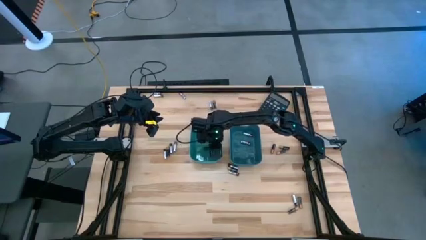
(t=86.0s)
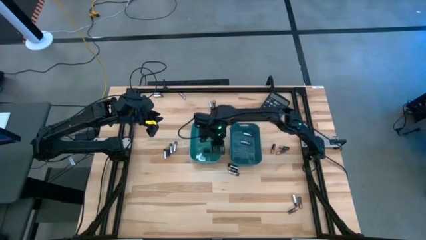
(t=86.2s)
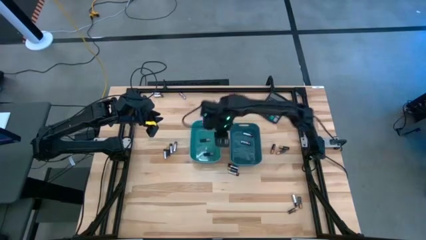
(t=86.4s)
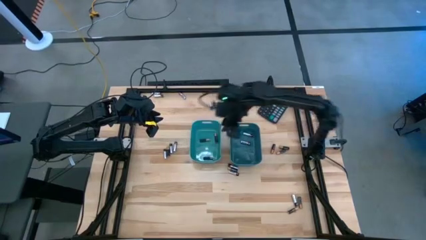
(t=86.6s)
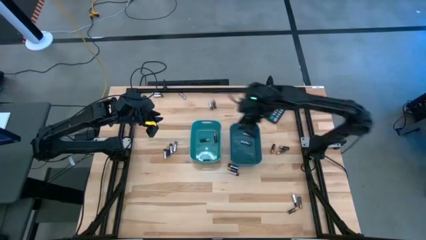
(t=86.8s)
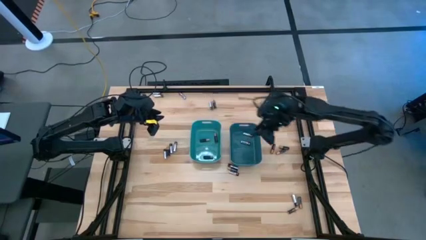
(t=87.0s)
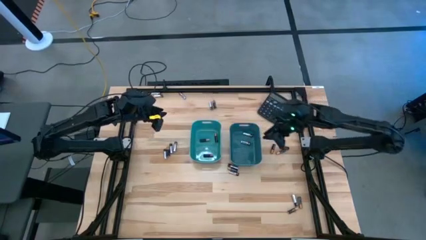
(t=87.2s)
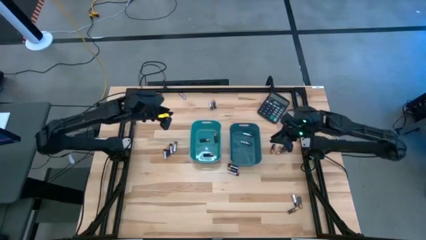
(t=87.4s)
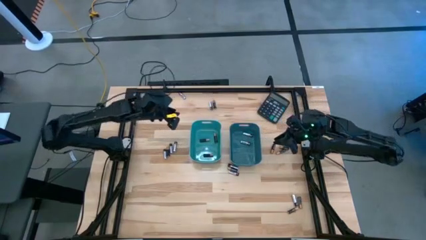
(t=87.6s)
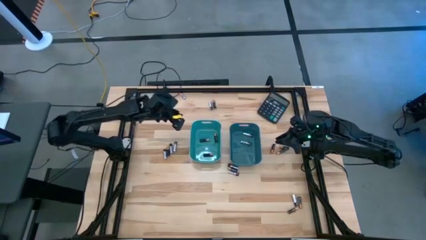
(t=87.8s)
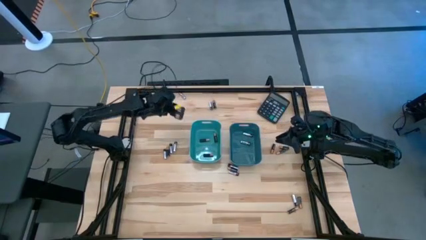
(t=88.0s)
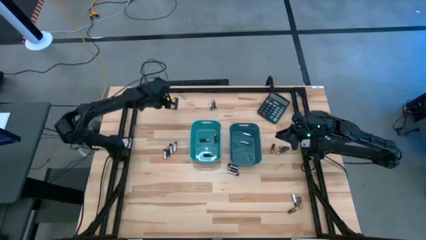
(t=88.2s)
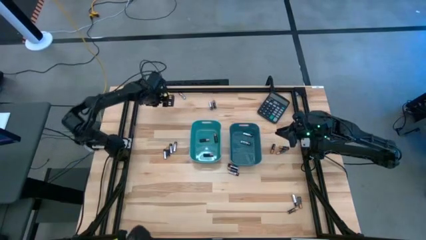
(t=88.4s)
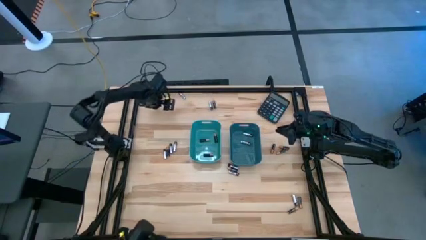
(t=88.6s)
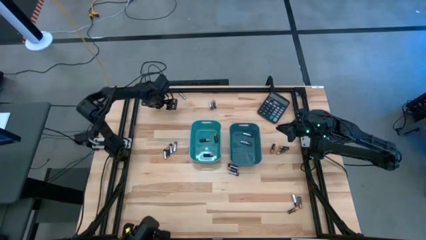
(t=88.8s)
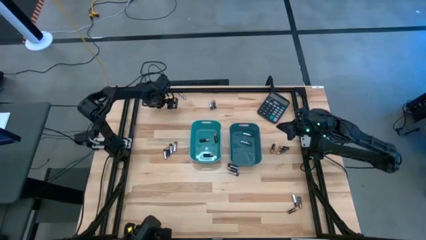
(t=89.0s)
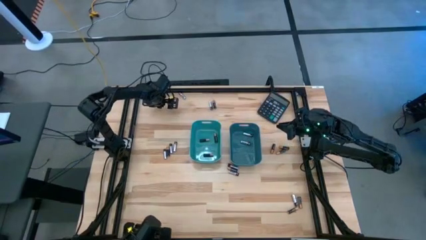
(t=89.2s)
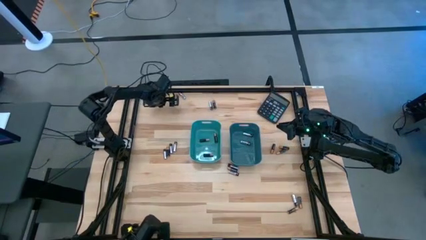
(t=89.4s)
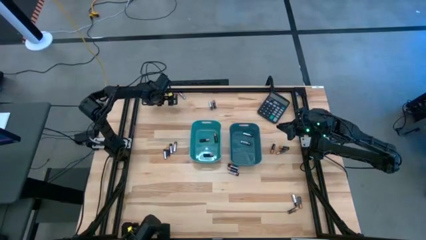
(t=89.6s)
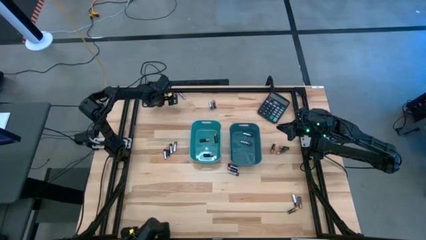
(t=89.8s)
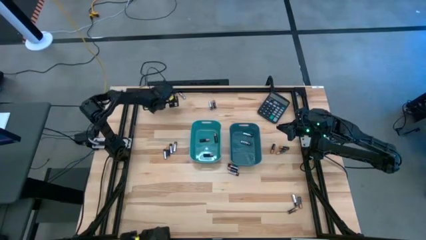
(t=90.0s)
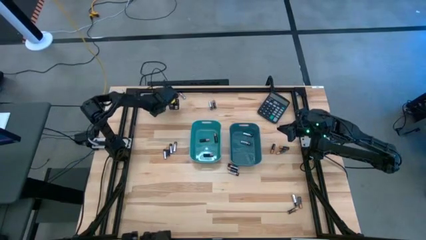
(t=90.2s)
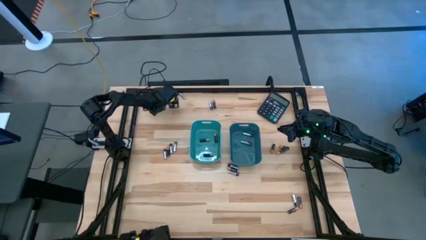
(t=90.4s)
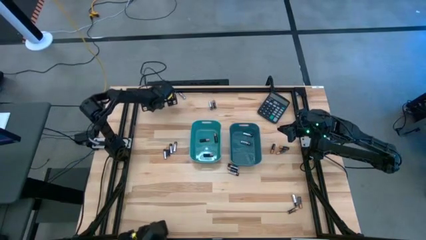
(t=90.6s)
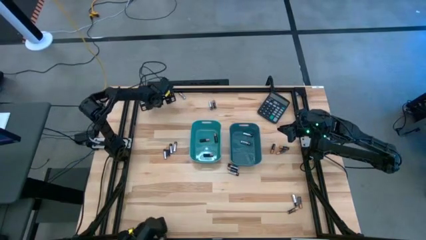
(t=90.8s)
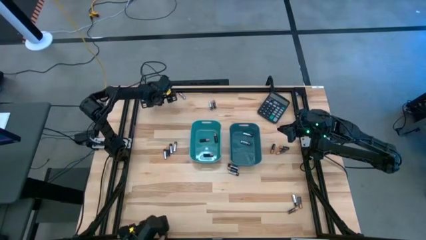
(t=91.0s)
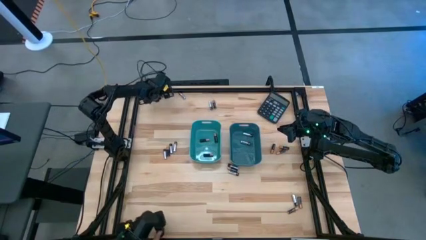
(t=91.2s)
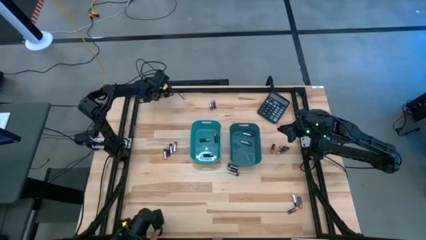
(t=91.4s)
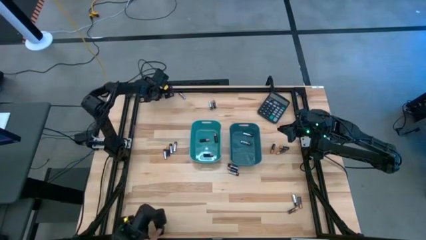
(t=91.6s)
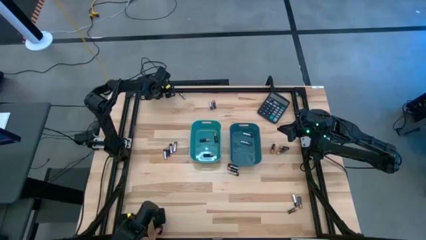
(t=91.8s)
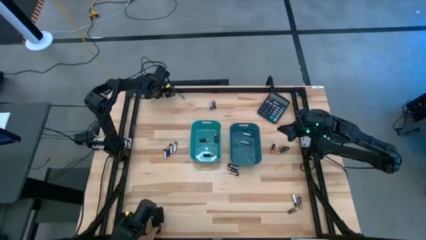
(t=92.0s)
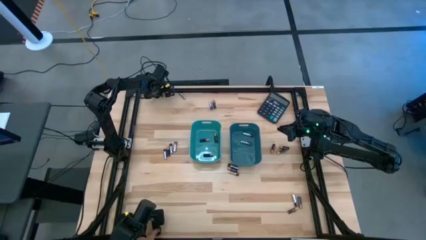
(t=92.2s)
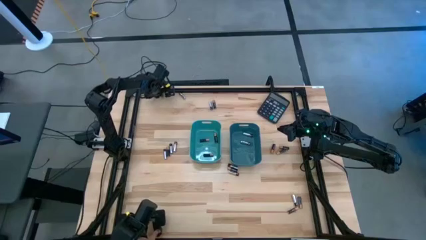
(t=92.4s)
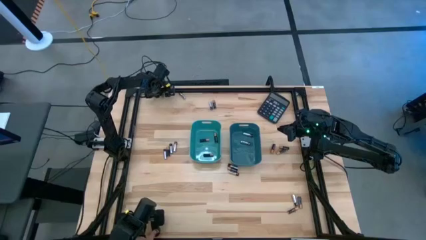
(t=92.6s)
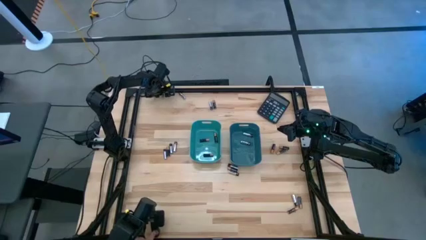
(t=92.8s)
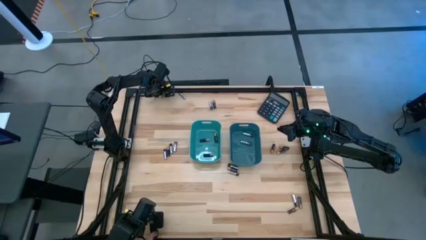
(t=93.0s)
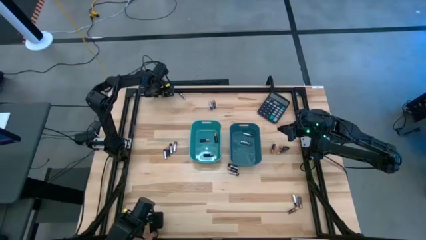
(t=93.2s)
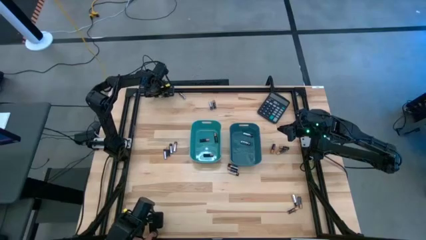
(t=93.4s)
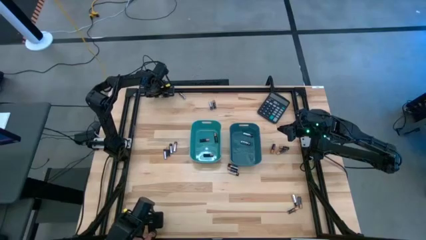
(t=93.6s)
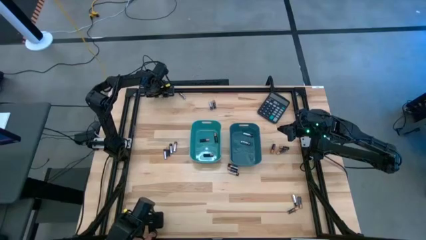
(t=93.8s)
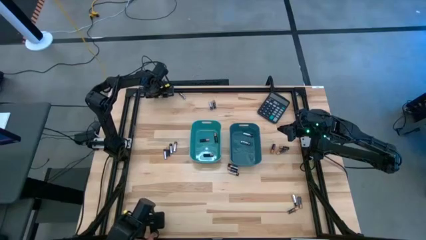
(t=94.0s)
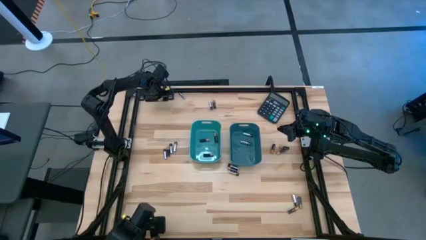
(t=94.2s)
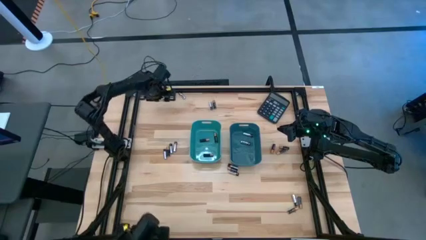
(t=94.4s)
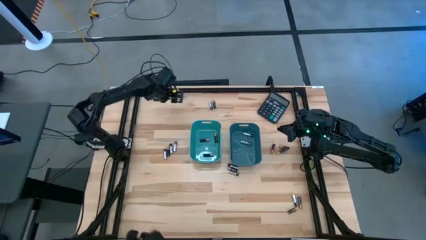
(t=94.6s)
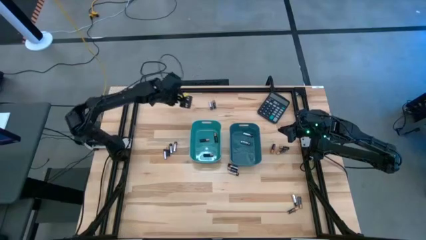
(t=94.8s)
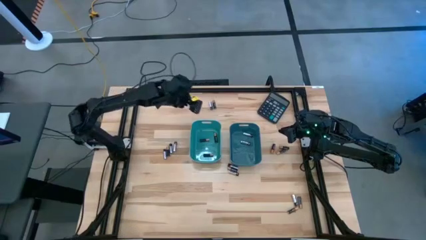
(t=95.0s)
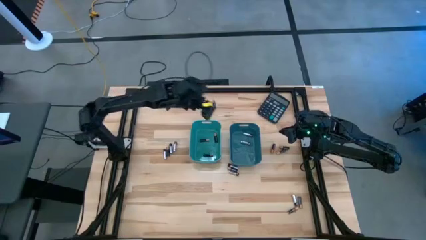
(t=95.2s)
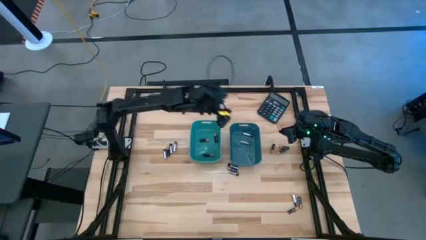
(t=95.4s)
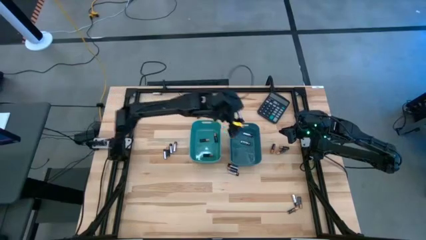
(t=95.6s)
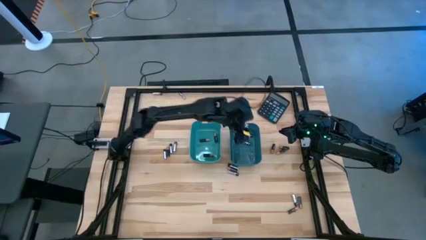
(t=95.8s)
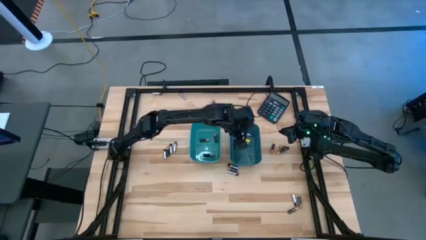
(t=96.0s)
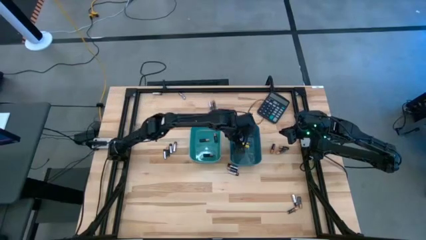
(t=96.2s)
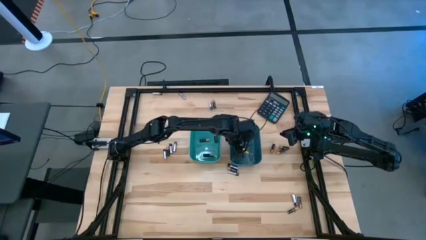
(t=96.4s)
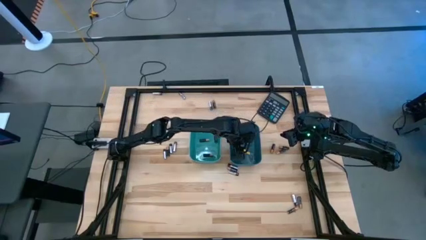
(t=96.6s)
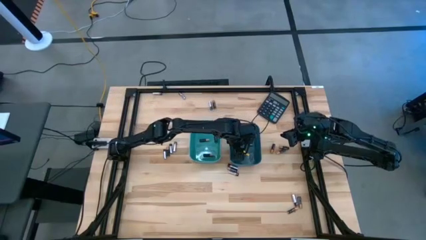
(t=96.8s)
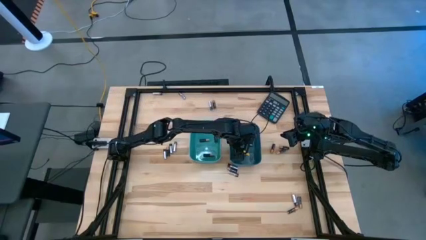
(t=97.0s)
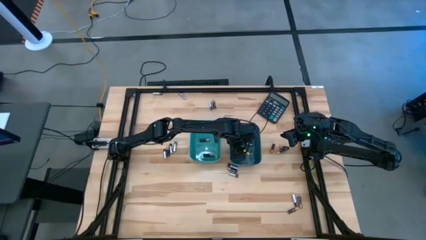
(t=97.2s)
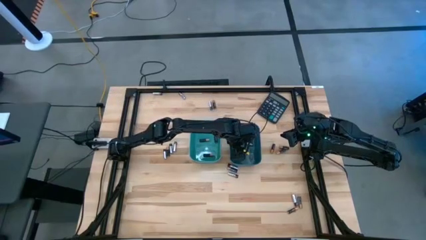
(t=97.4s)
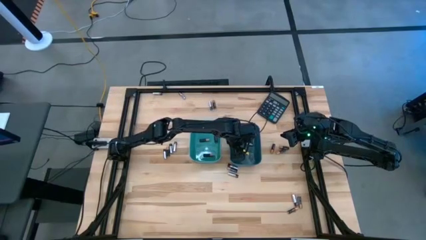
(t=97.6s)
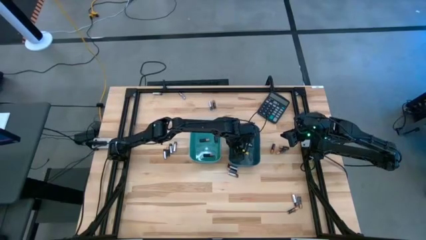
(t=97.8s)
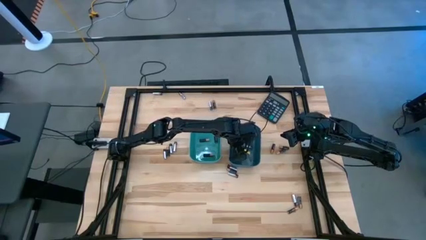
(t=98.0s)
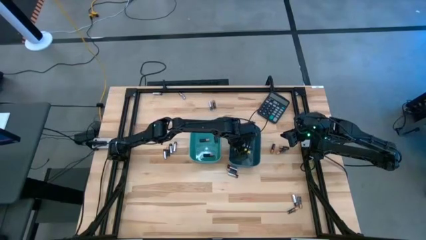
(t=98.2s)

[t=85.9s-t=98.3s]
Task: Sort batteries
Put the silver battery into the blue bin

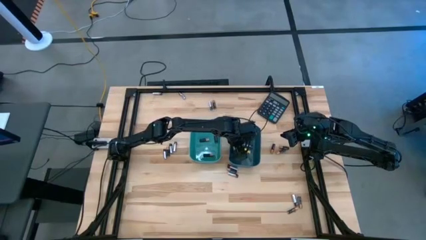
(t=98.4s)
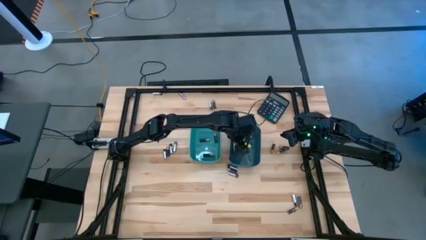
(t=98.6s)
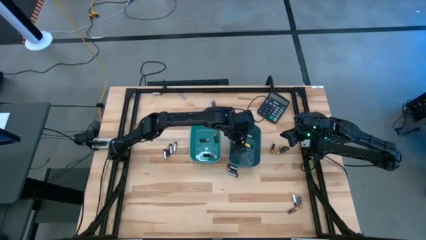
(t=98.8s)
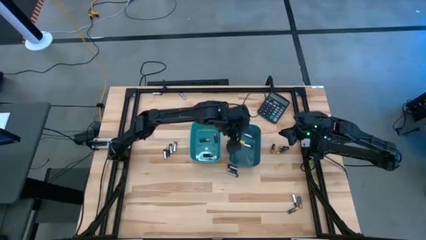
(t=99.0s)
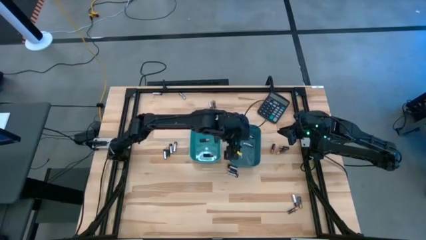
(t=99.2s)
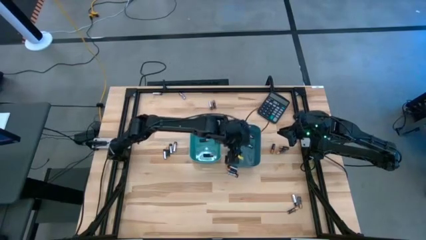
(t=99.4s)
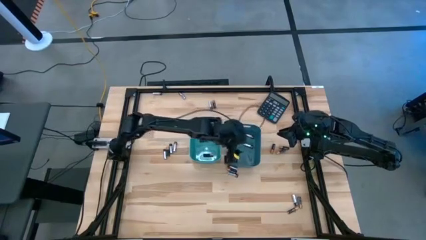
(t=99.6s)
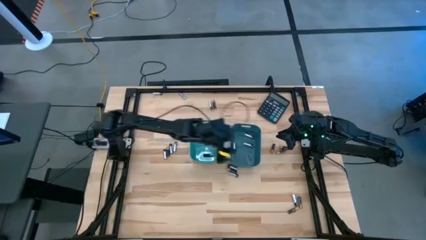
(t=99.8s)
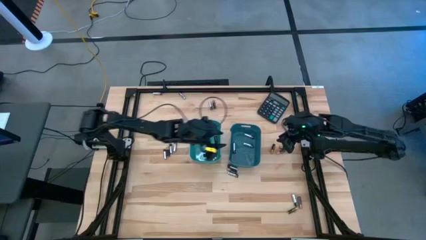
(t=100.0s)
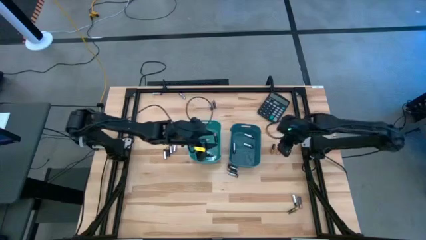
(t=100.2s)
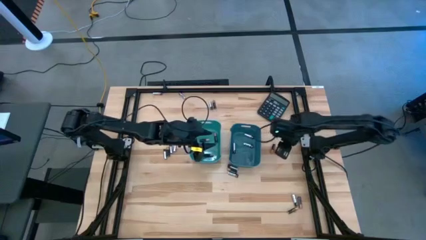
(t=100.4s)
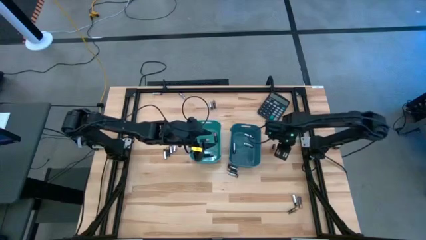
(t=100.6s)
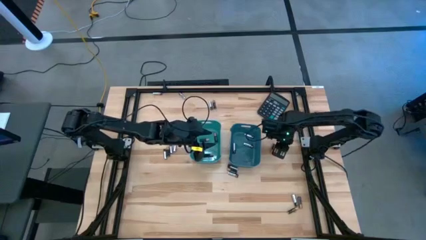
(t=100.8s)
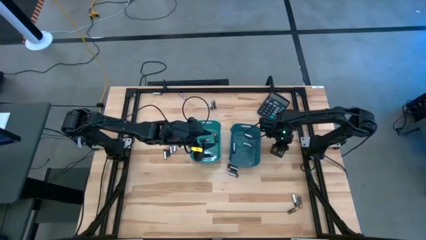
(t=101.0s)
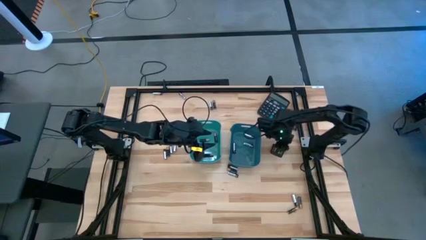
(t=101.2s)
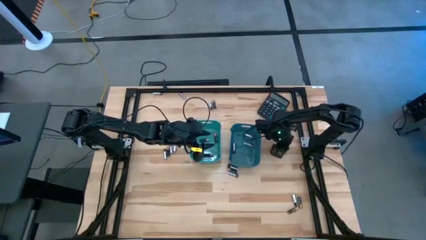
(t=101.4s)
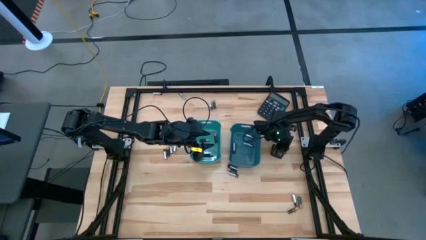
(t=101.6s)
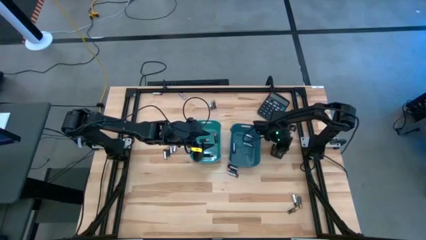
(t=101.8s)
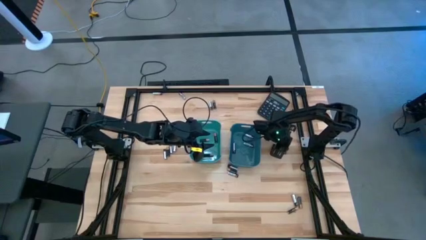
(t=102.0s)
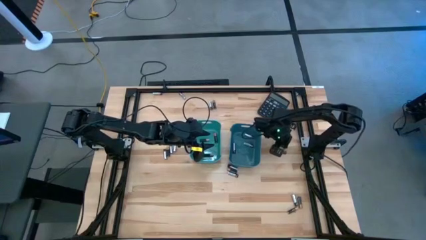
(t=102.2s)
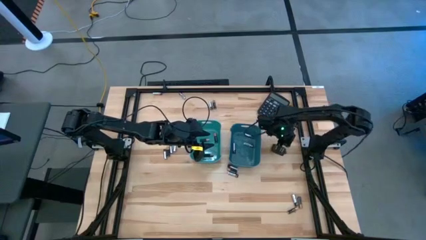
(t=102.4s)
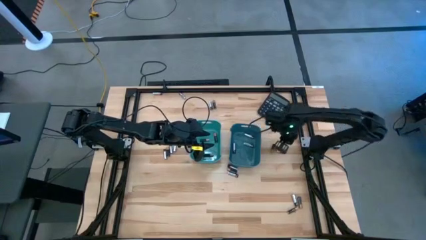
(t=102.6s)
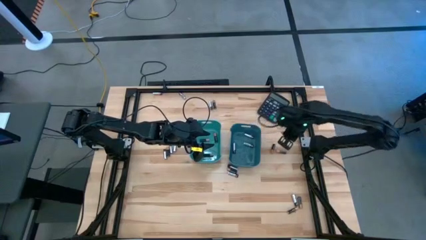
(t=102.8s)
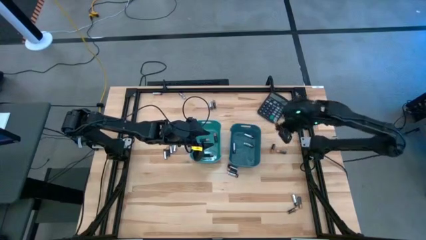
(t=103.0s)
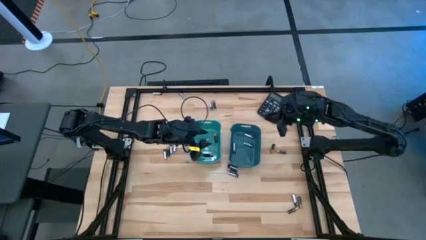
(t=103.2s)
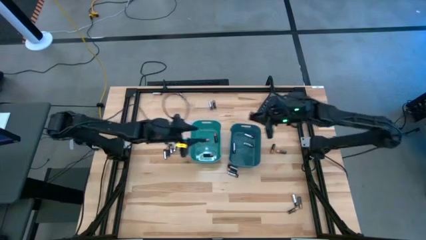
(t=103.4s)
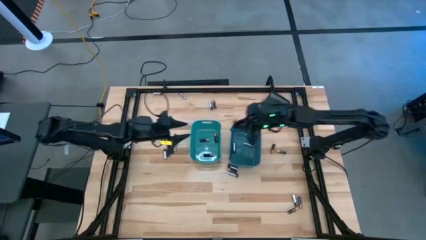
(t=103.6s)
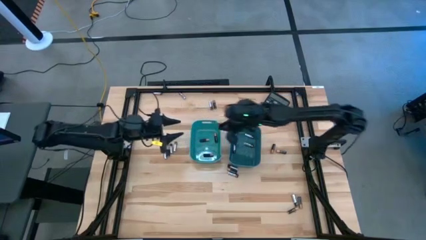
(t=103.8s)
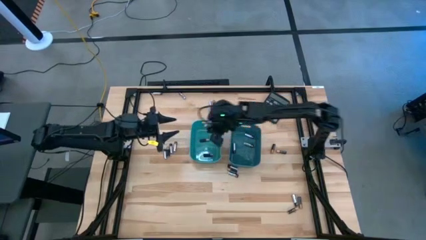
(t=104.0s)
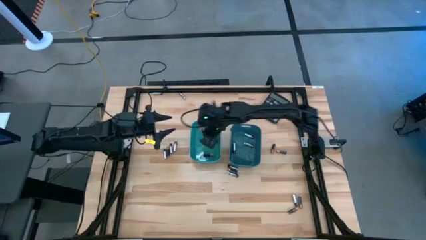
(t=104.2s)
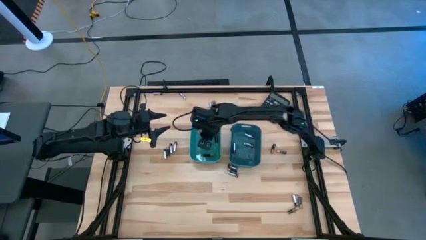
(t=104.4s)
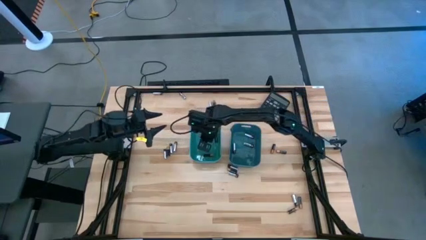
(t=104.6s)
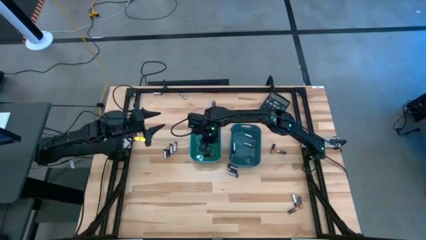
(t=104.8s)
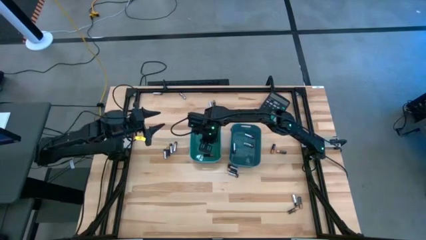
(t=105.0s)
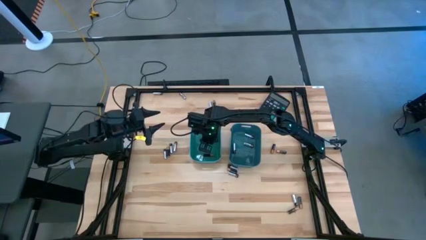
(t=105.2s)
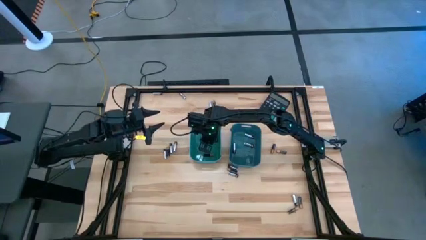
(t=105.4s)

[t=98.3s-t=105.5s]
Put the black battery into the green bin
